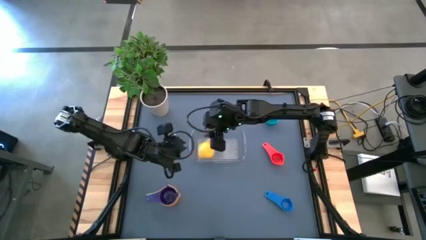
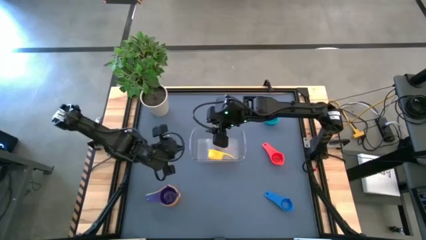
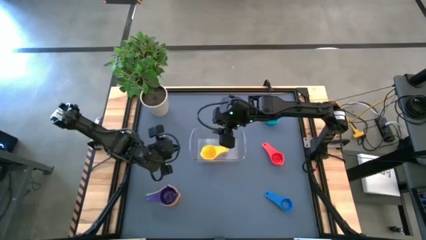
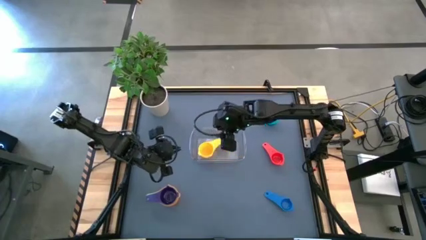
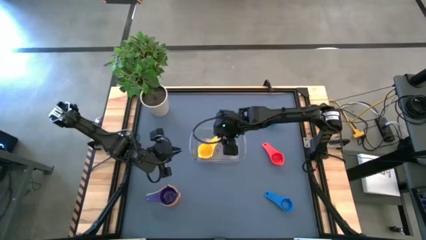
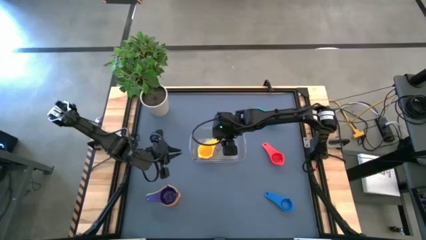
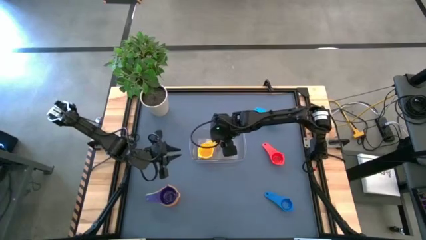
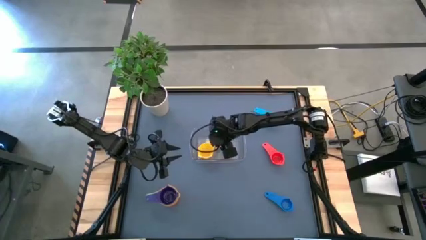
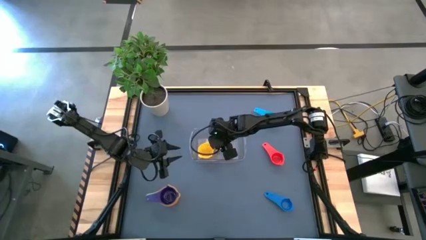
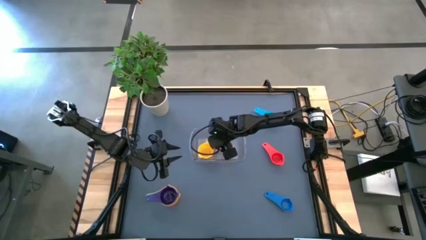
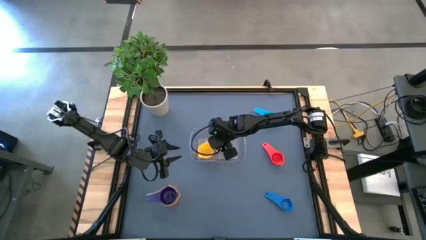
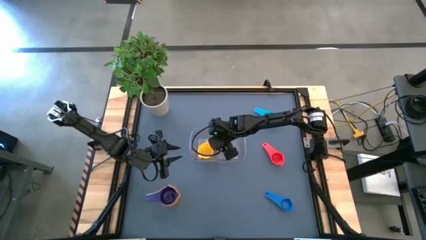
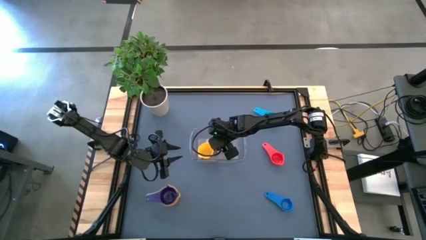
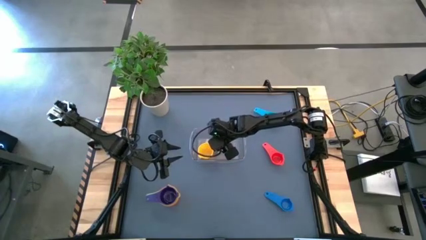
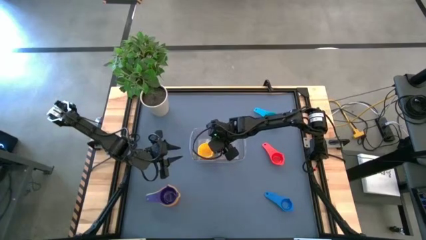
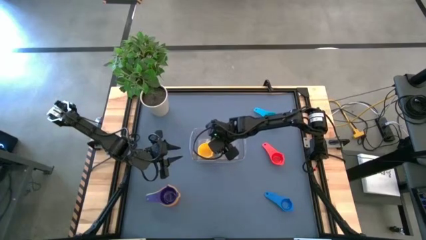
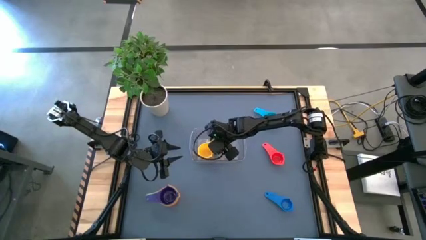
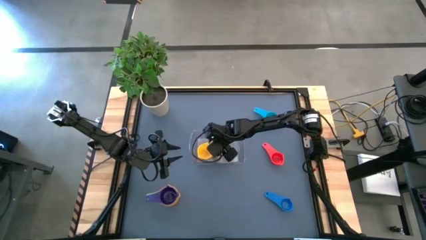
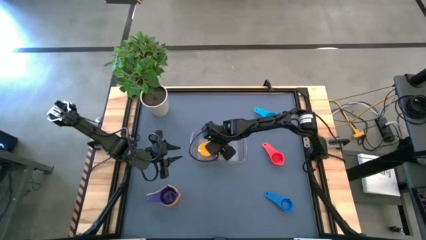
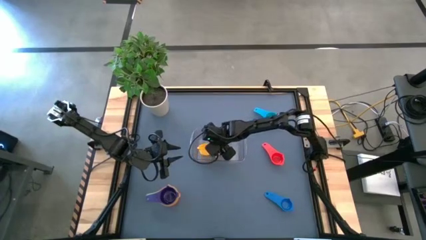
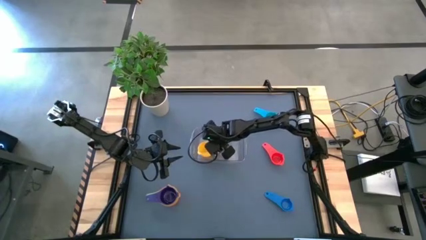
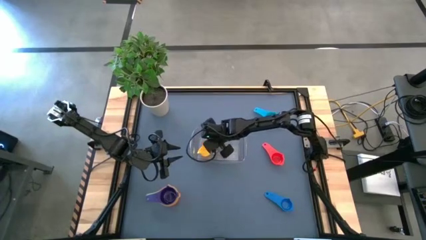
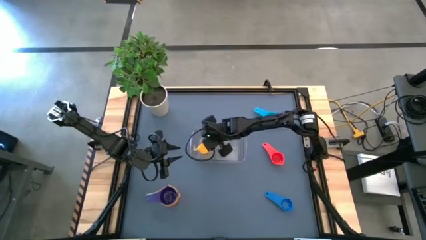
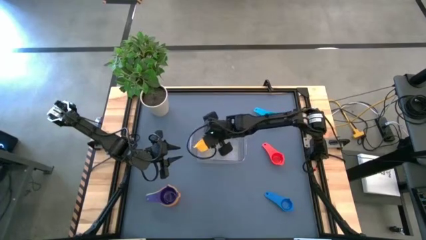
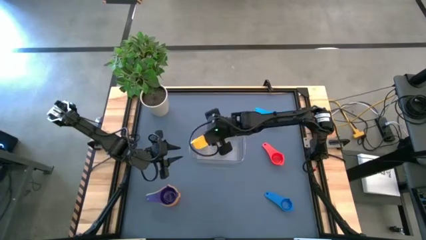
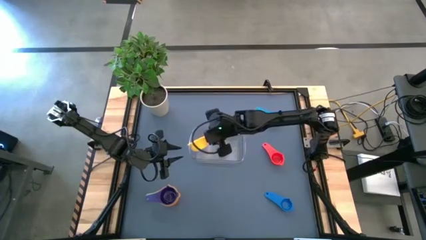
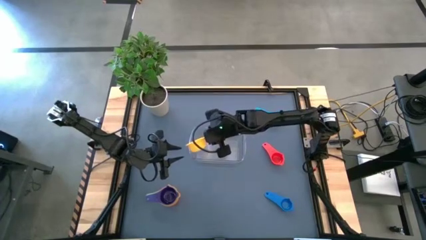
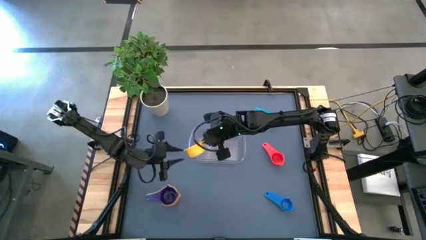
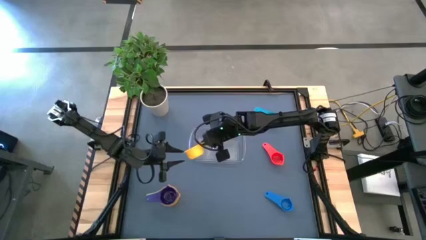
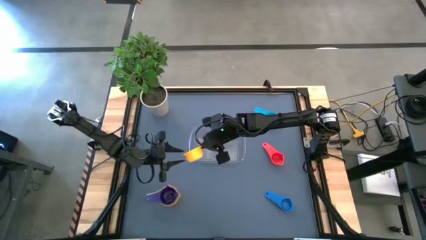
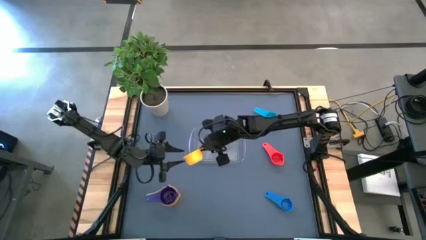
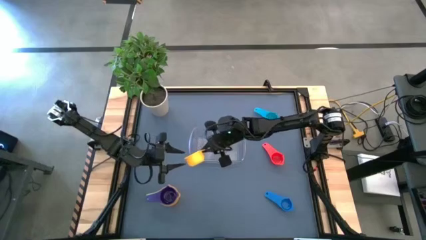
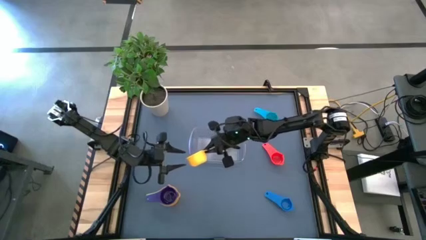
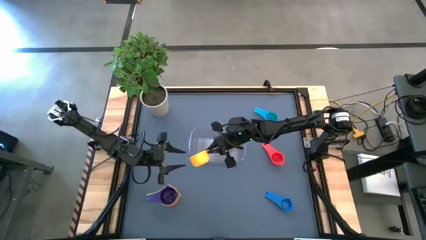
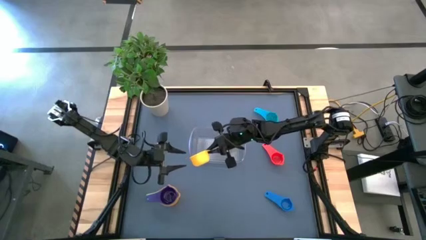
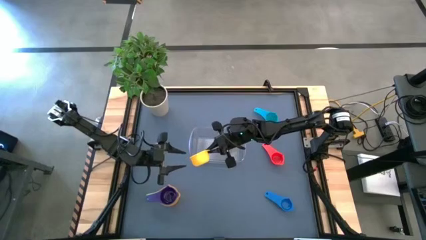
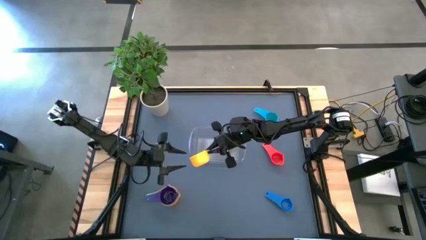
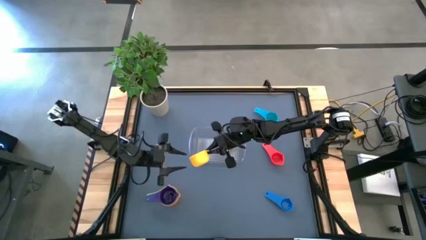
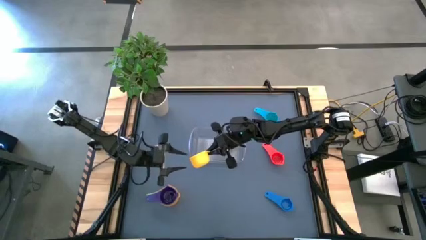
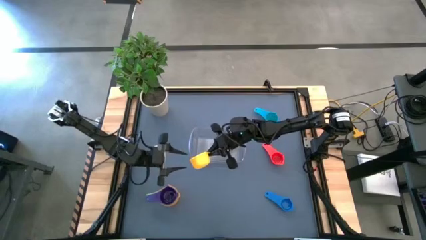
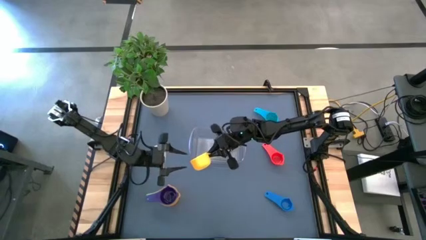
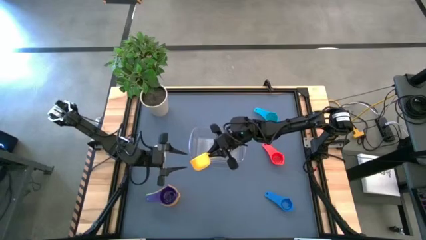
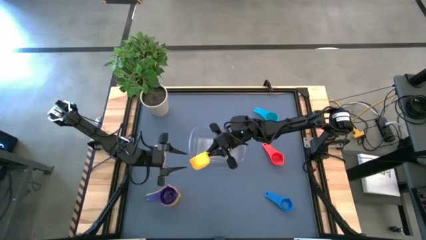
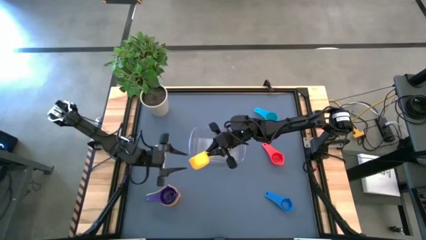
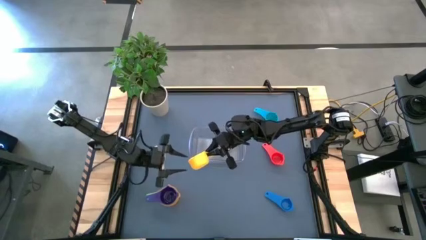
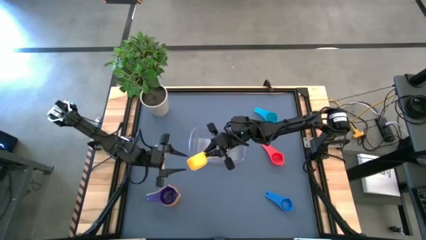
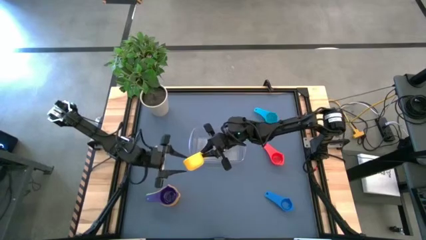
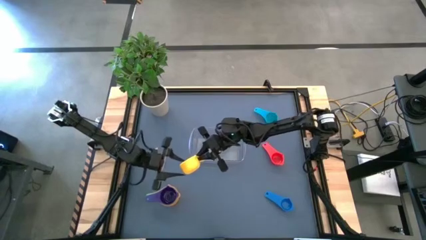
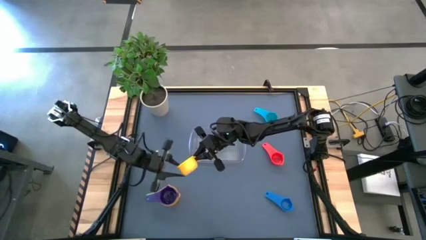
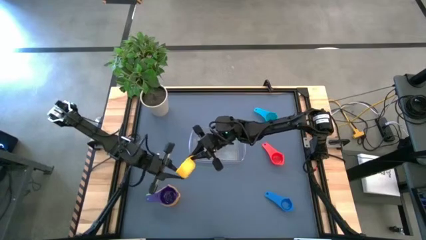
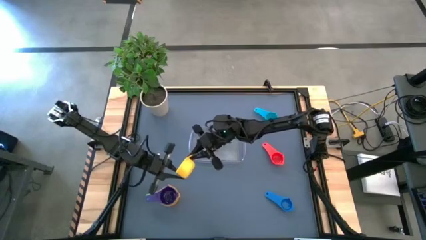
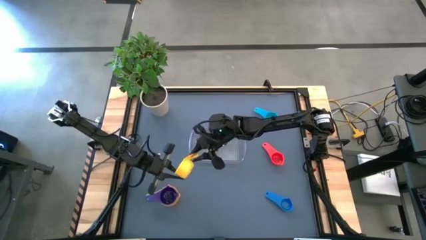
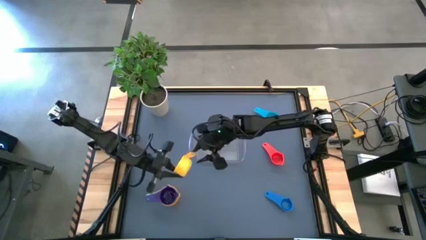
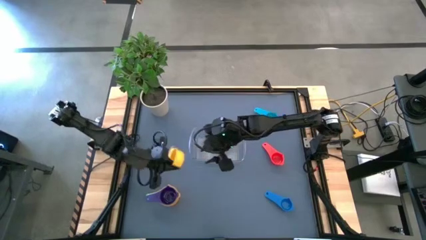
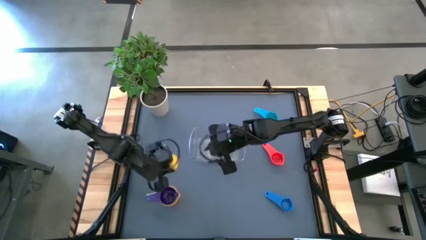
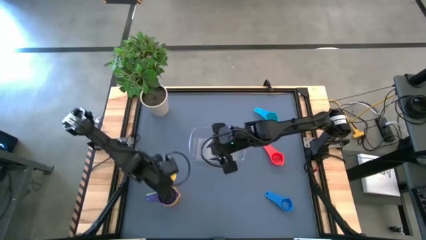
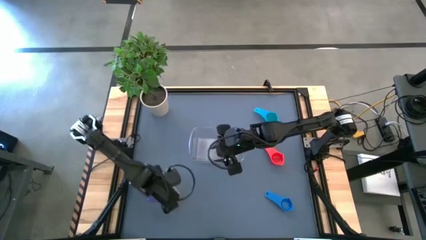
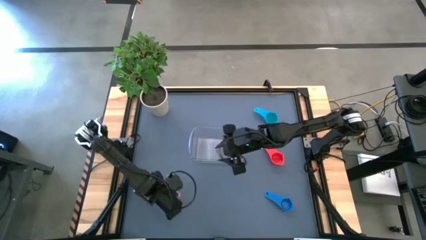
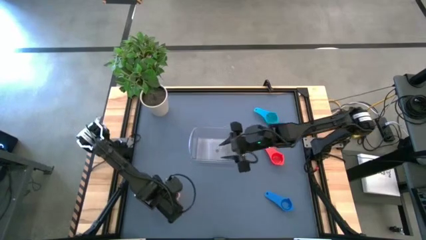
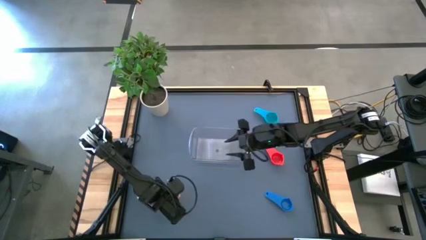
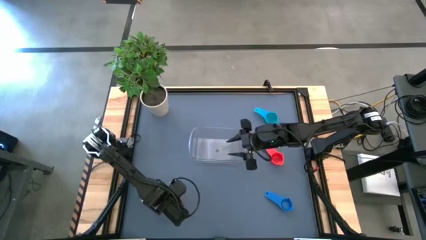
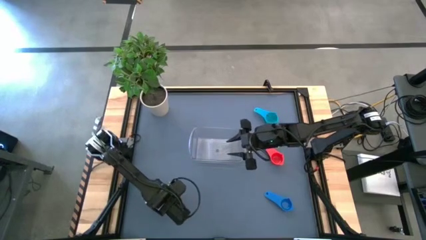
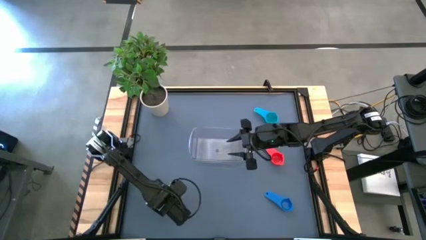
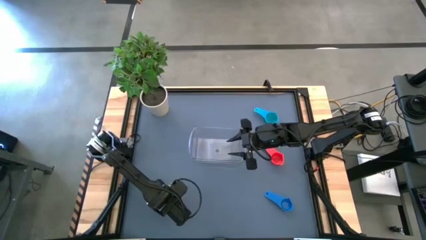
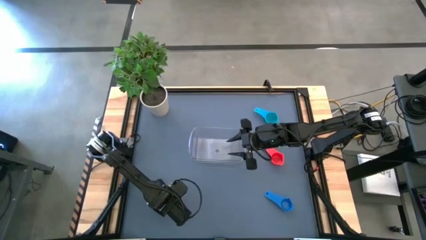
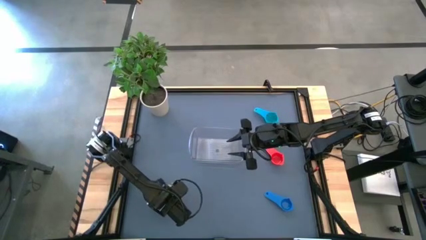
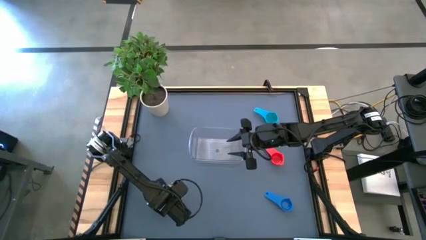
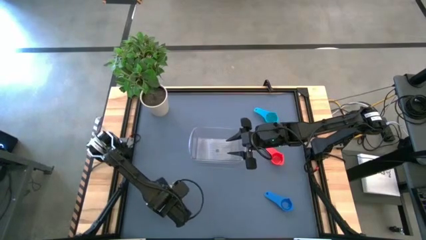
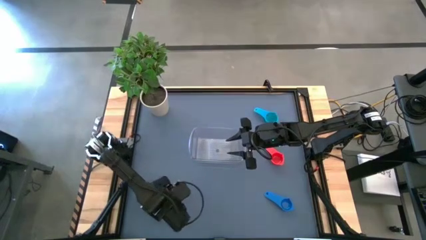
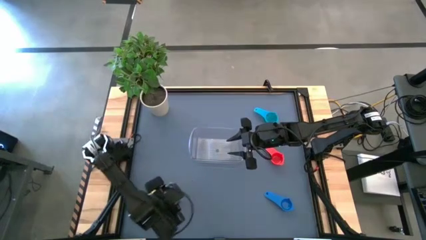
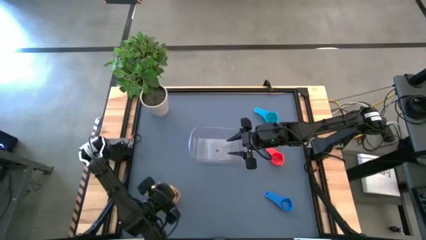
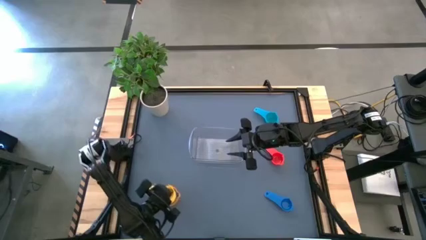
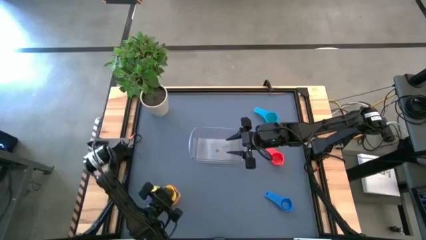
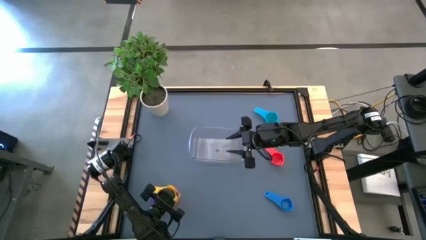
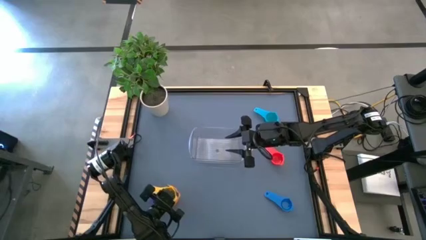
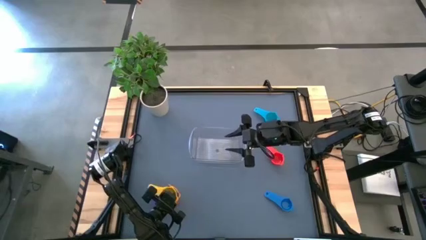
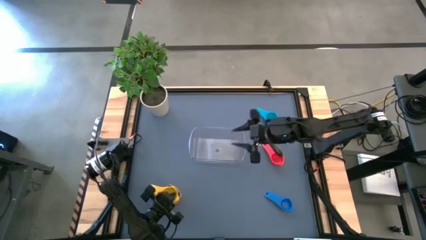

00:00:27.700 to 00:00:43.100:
Task: Nest measuring cups in basket
Stack the yellow measuring cup on top of the violet measuring cup

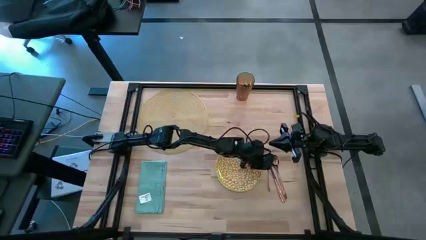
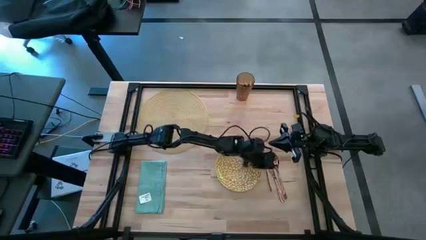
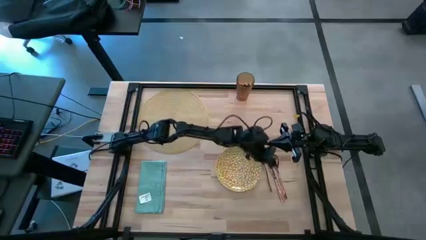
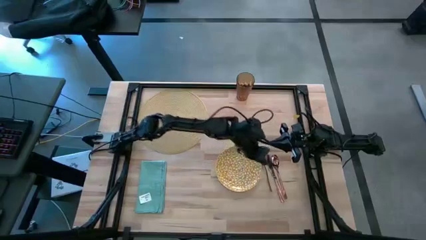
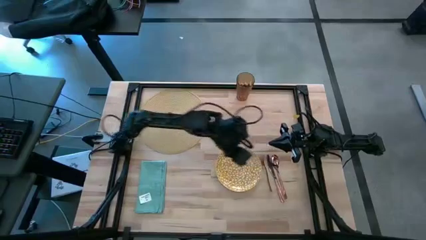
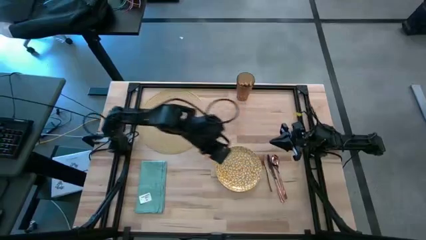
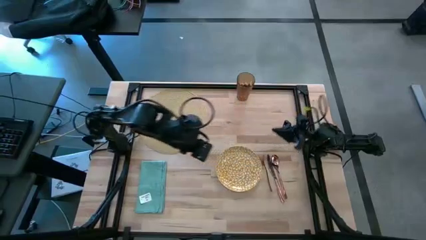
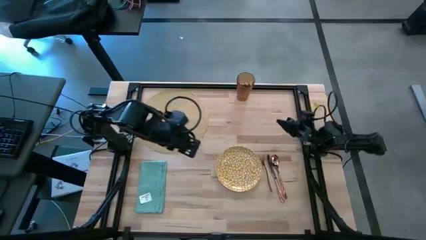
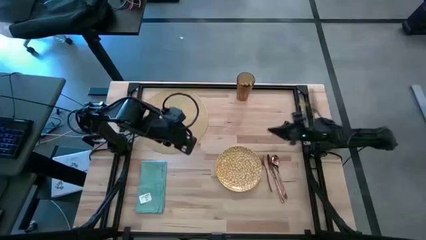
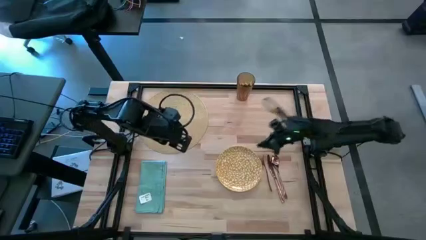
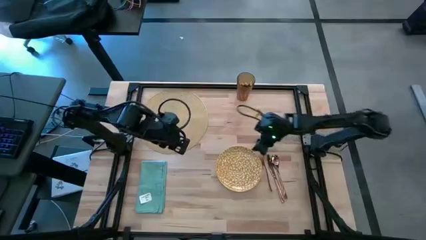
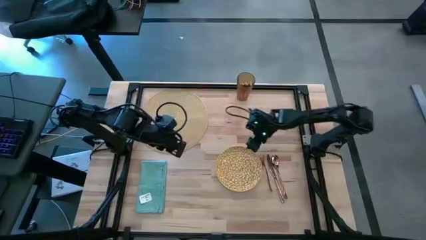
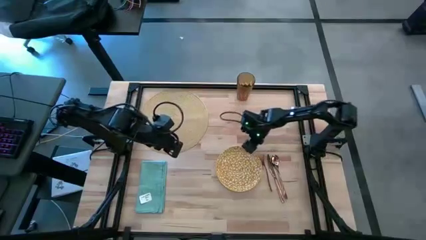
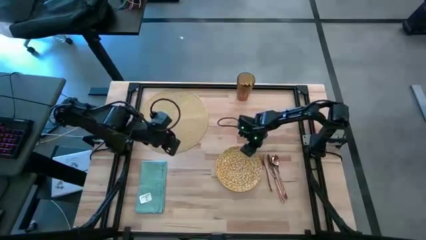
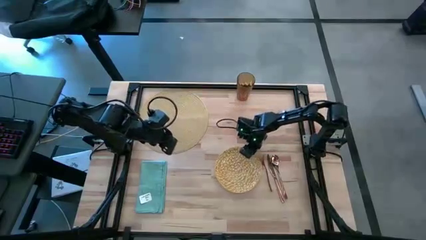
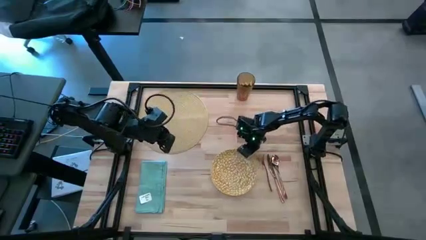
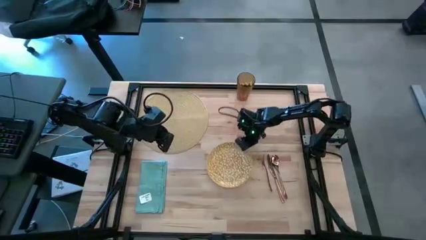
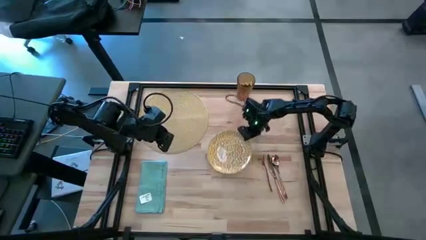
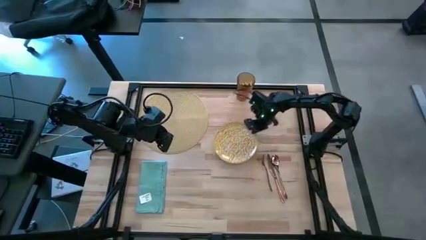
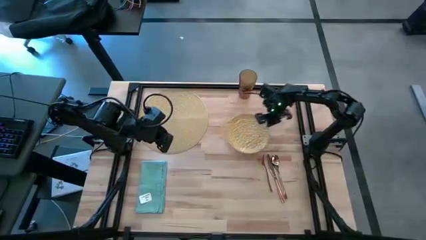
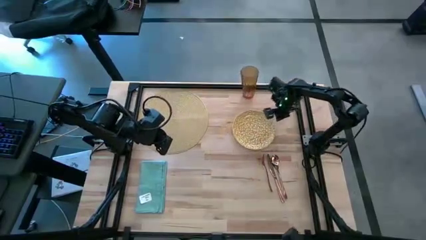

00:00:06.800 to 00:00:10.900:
Task: Set table place
Move the yellow plate to the top right of the table
